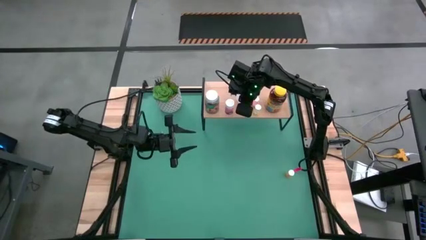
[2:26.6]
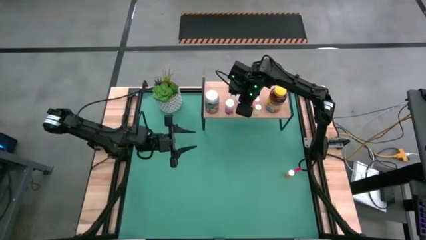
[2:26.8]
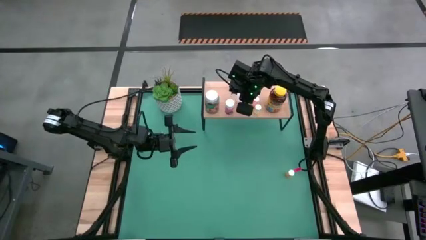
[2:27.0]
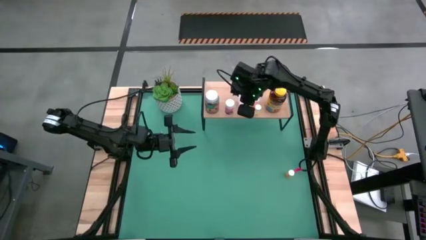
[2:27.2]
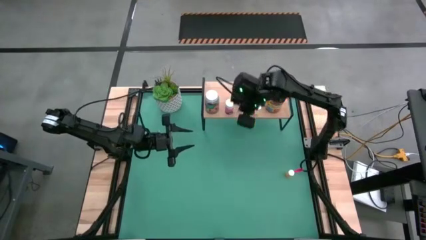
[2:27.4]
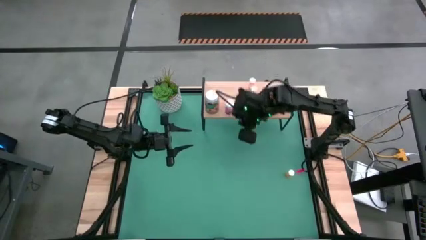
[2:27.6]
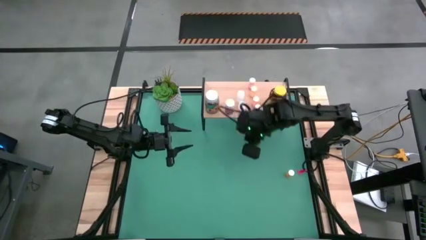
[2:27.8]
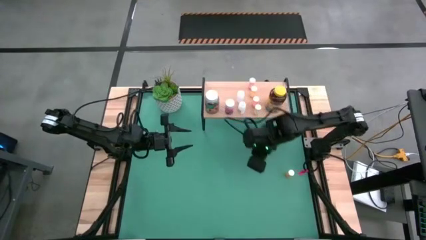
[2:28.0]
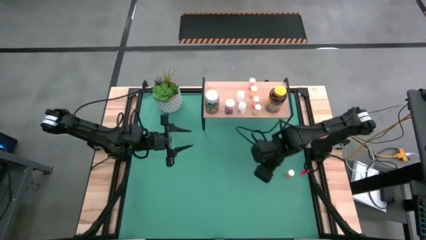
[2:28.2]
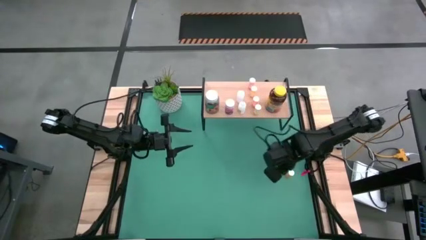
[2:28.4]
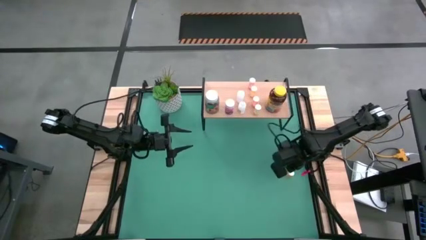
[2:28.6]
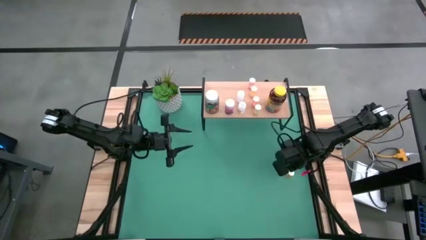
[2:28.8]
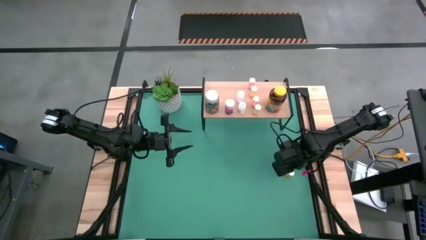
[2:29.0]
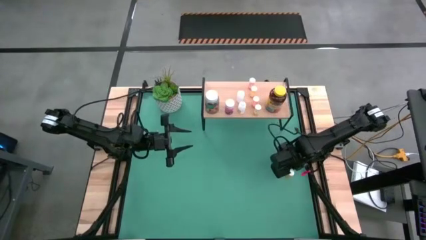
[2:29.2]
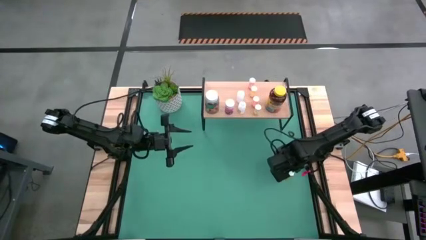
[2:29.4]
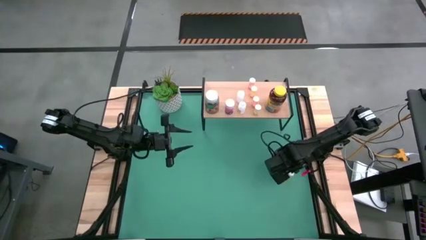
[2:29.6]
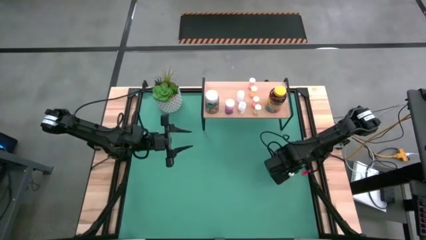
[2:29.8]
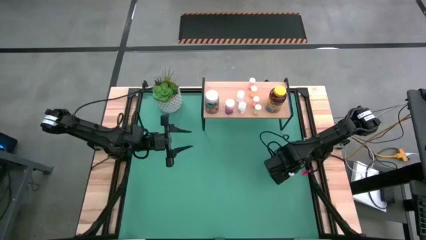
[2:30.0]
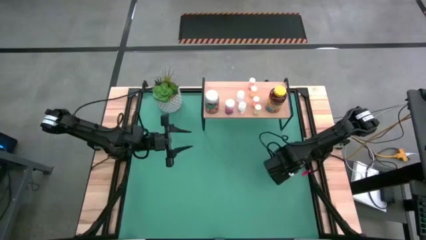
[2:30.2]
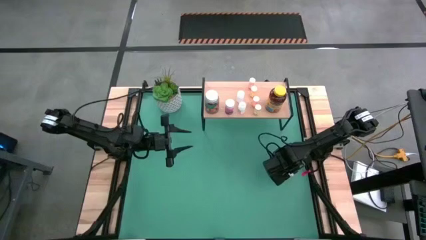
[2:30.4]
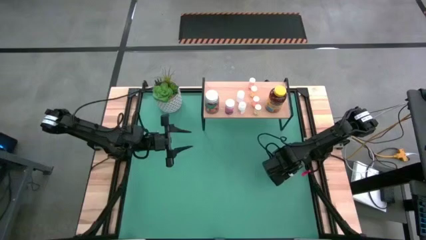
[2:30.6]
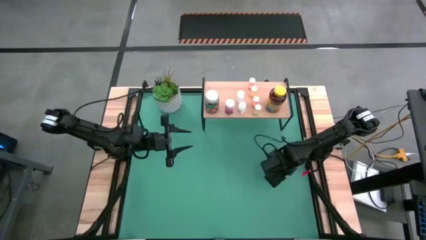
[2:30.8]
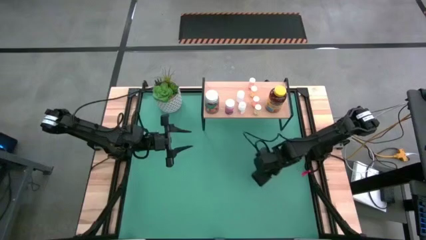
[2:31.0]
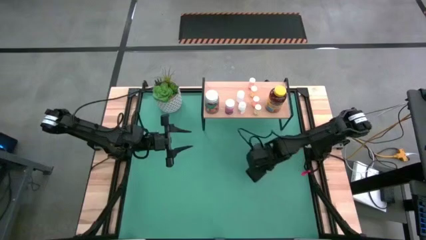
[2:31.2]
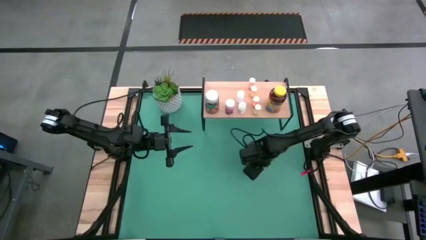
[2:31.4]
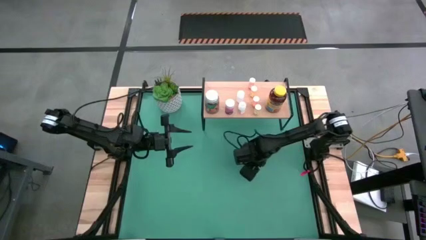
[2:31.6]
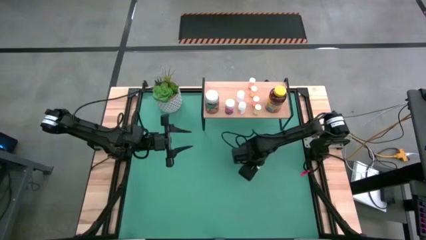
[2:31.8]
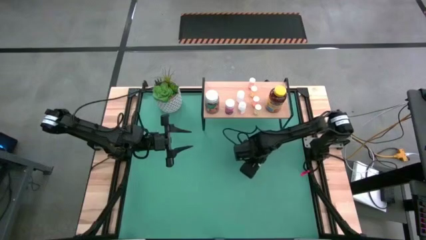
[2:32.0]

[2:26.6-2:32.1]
Task: Pick and place medicine bottles onto shelf by color
Move the orange medicine bottle to the middle left of the table

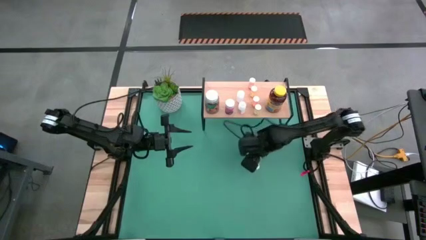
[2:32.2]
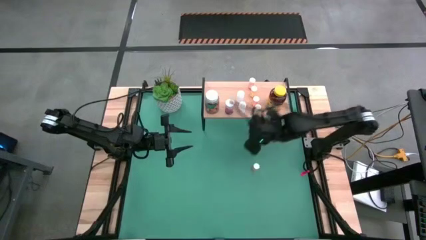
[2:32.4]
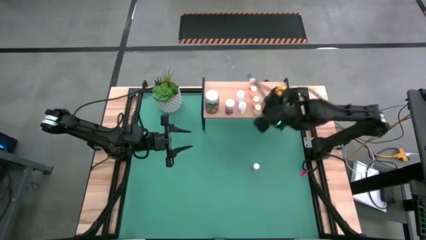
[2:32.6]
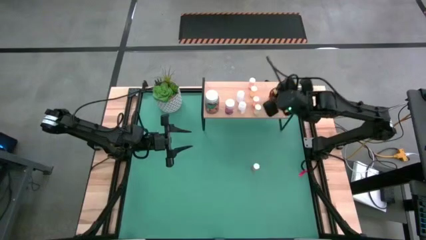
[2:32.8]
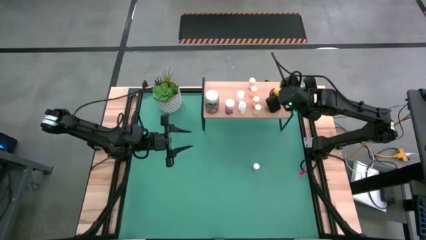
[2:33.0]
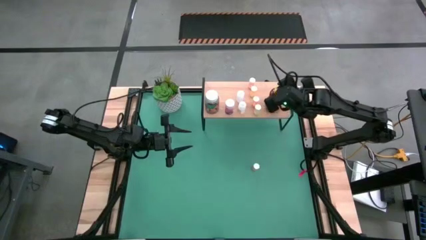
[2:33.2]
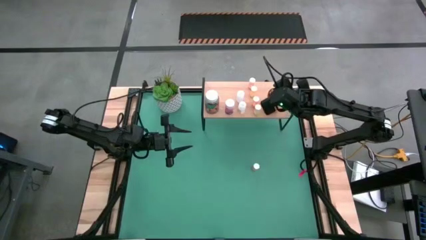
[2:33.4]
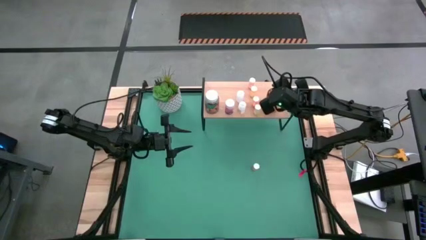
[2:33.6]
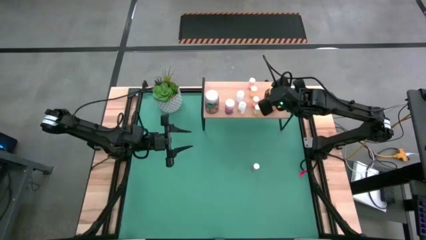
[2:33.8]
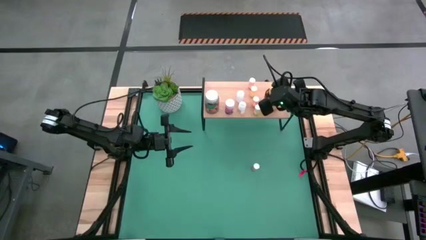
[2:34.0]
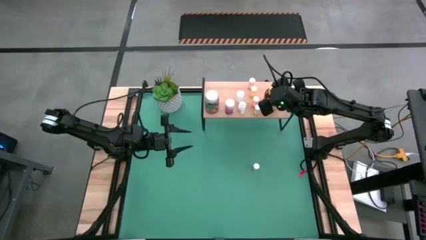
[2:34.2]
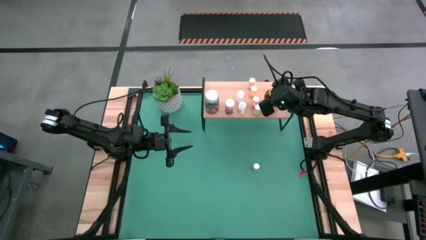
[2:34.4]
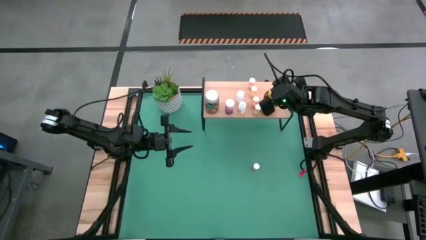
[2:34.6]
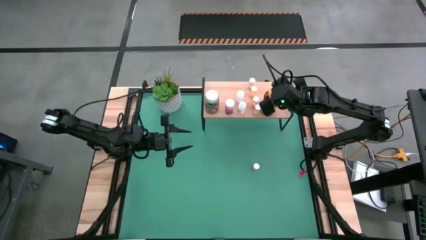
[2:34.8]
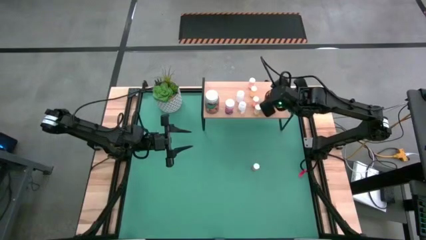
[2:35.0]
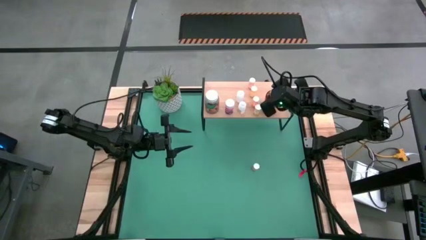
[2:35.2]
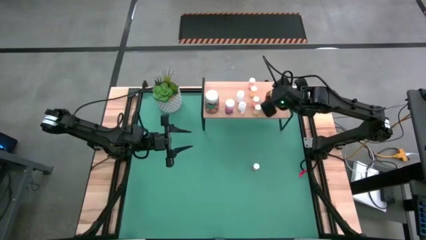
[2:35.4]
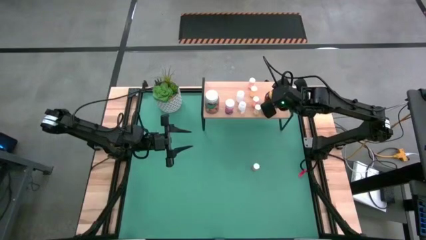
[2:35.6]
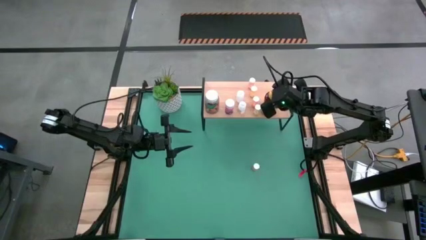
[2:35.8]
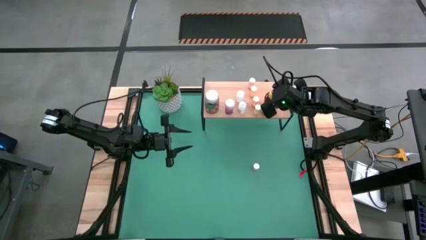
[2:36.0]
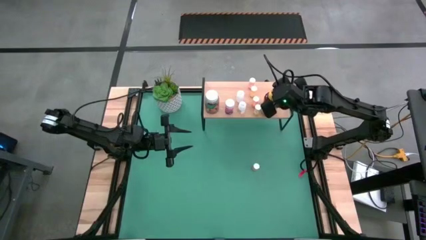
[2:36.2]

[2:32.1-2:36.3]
Adjust the large yellow medicine bottle on the shelf

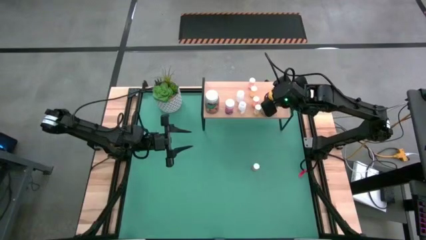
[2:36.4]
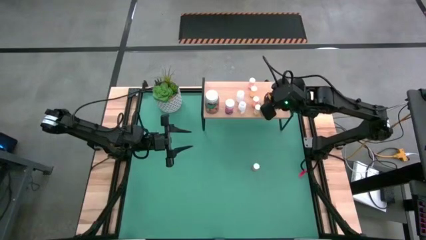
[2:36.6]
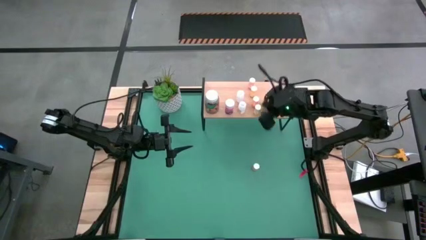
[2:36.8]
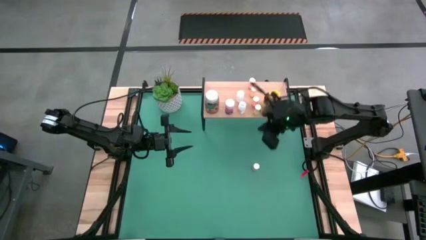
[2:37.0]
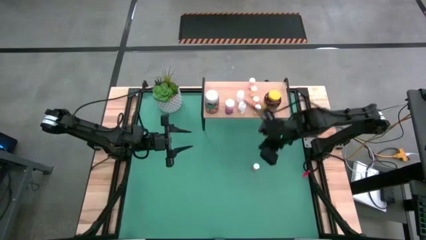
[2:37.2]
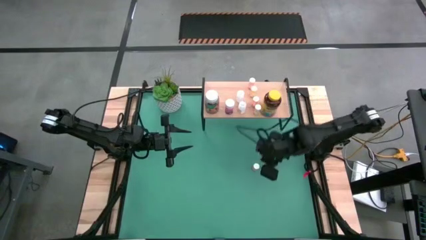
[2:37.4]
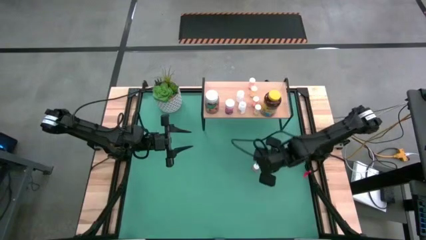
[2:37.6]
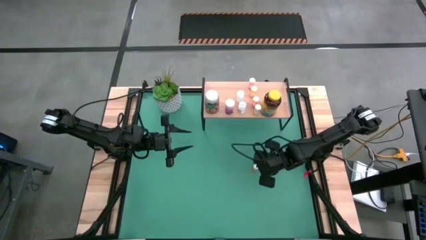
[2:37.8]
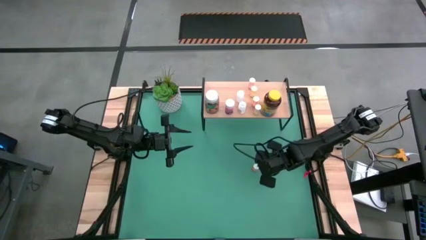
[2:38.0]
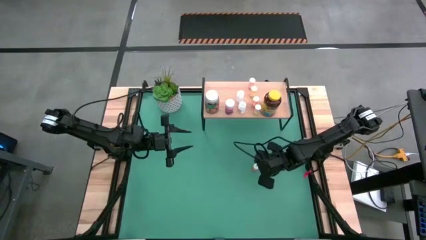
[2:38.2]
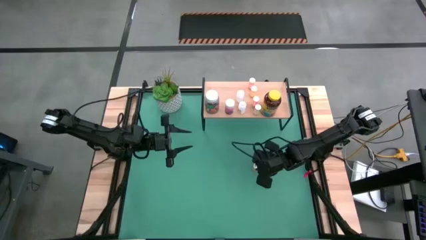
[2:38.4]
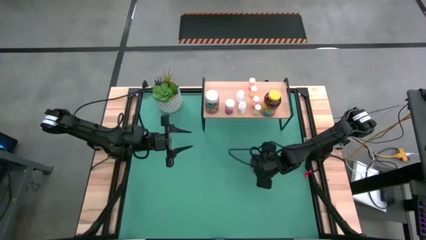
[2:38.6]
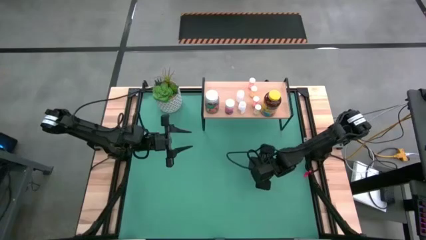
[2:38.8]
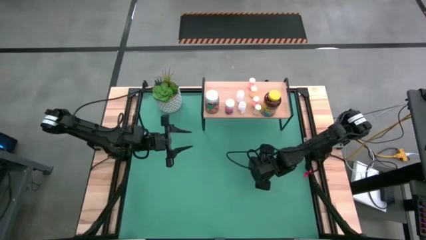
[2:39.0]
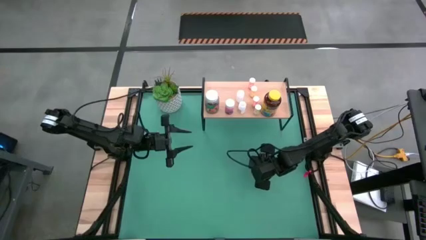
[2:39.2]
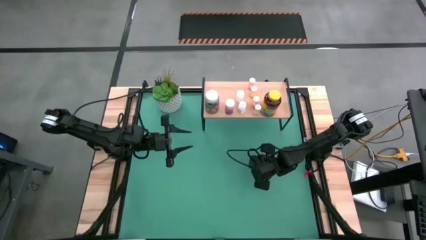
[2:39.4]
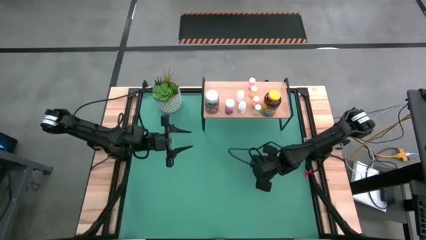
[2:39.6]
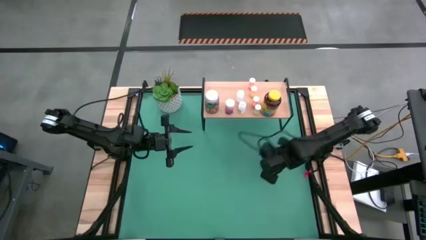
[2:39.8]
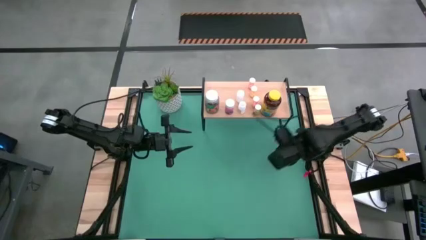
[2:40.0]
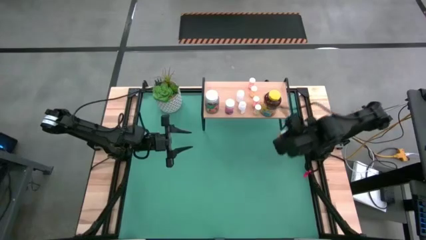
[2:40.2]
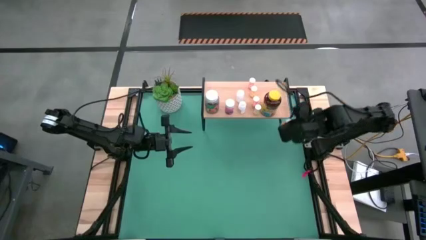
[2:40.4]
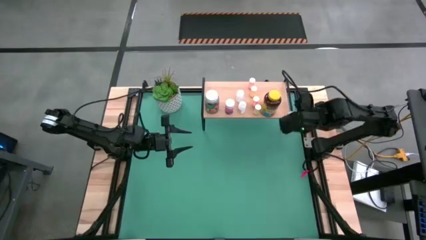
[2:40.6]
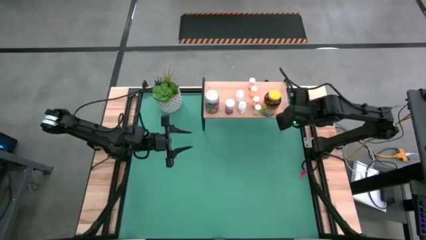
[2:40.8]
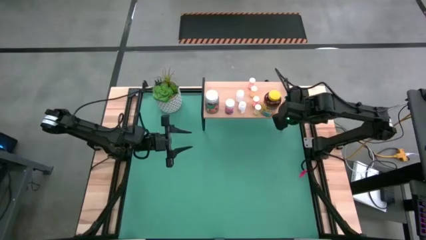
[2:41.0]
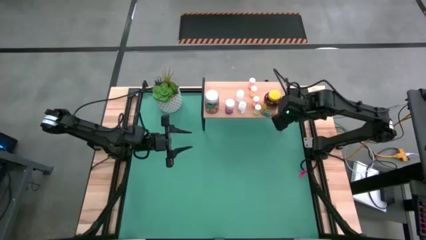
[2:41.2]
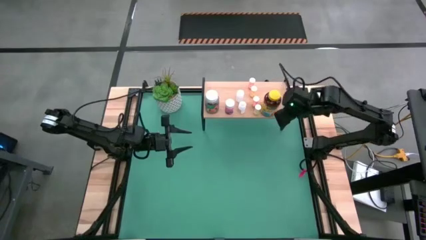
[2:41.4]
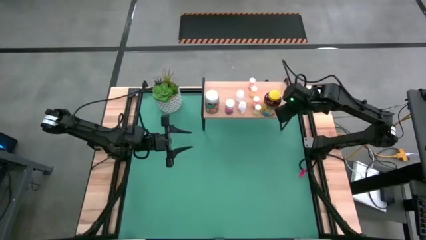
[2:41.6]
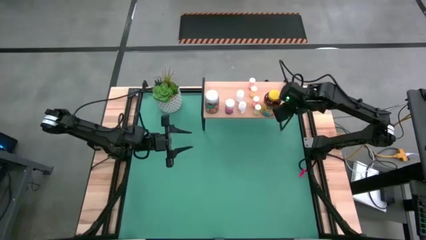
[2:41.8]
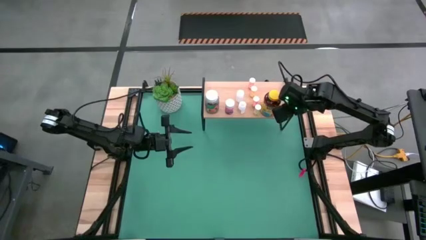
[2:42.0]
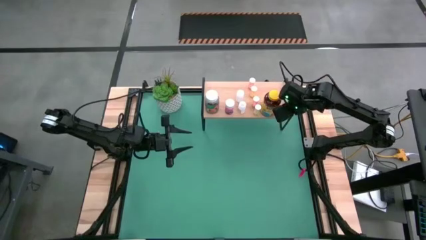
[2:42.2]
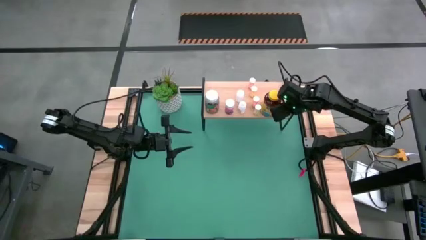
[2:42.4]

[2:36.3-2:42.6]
Put the orange medicine bottle on the shelf
